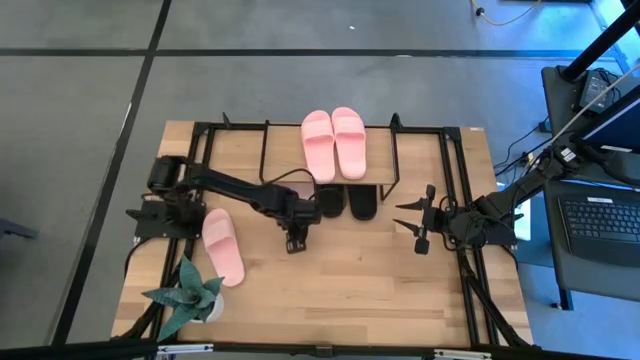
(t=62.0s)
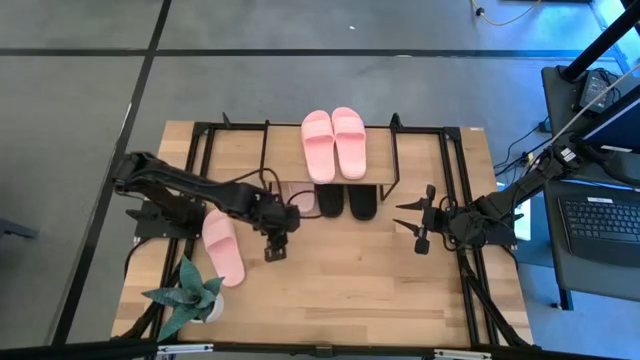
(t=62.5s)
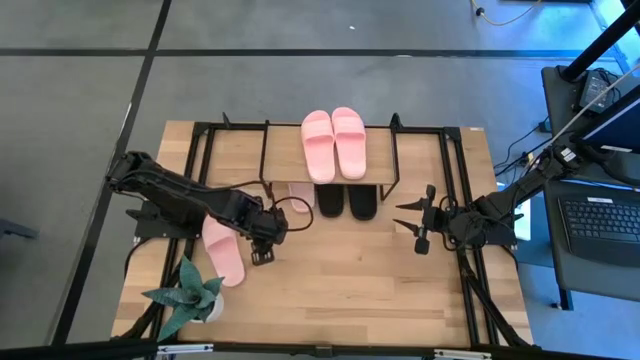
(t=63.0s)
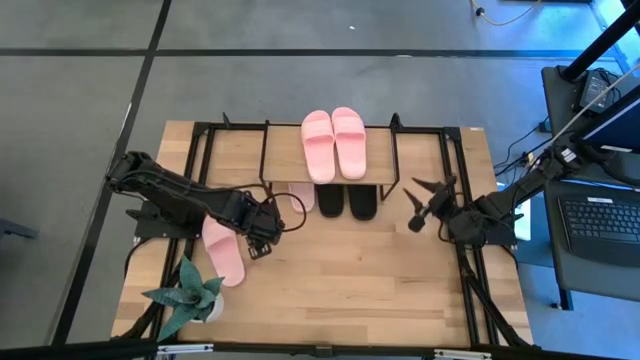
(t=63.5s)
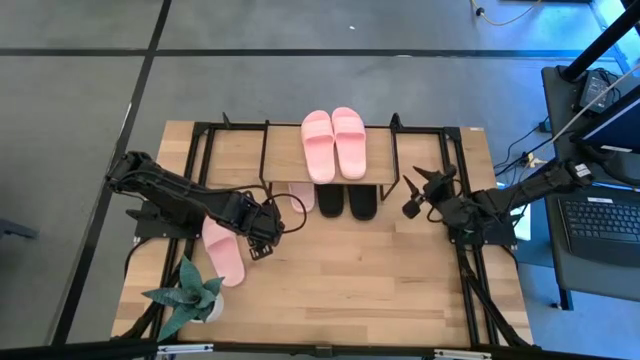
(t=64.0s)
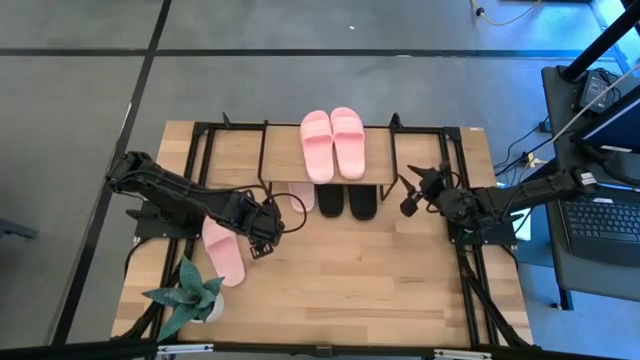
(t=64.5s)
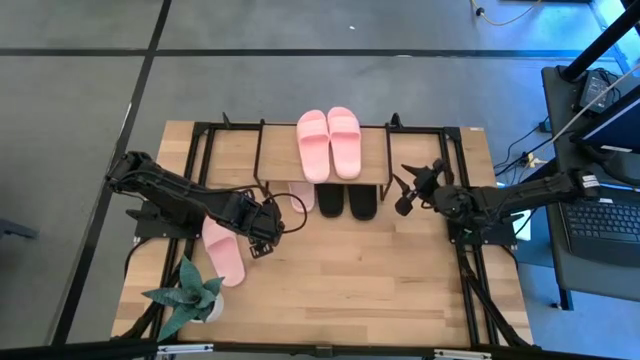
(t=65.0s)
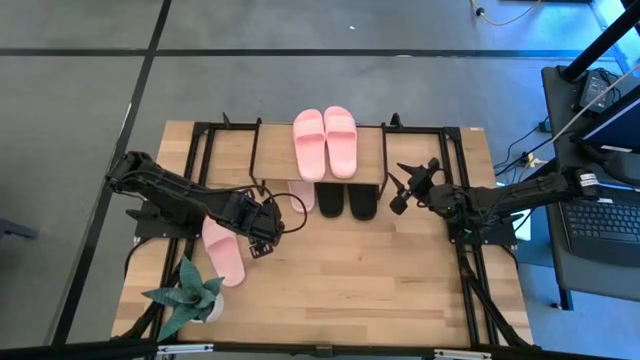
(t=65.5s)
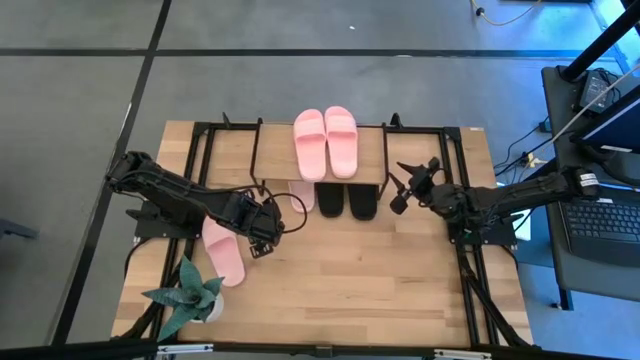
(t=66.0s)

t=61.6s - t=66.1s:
Task: Pick and place slides into the shelf
Adjust the shelf on the table

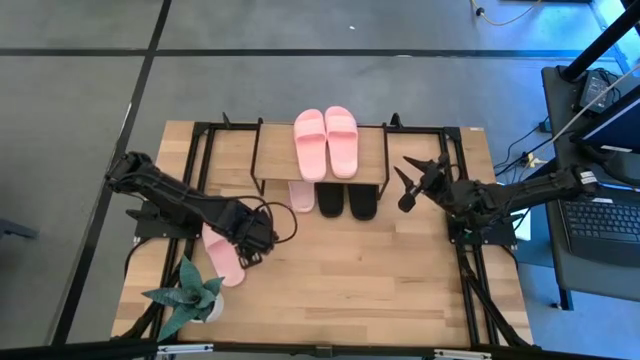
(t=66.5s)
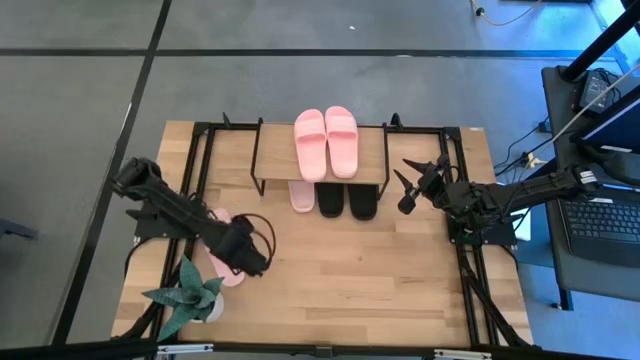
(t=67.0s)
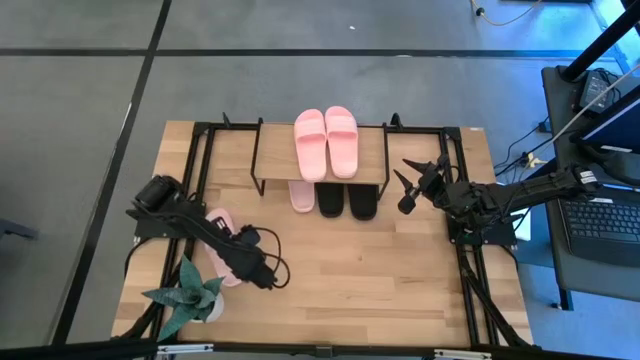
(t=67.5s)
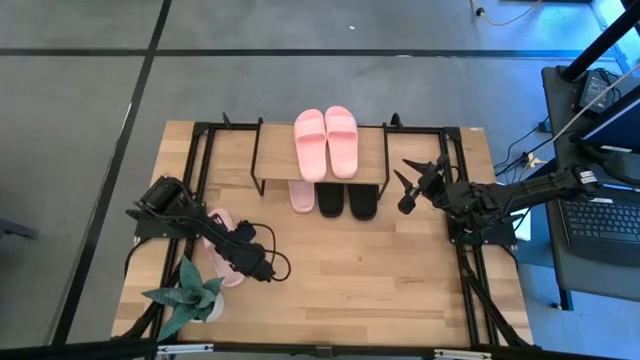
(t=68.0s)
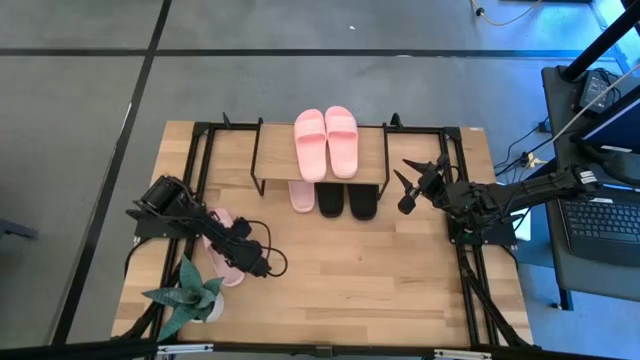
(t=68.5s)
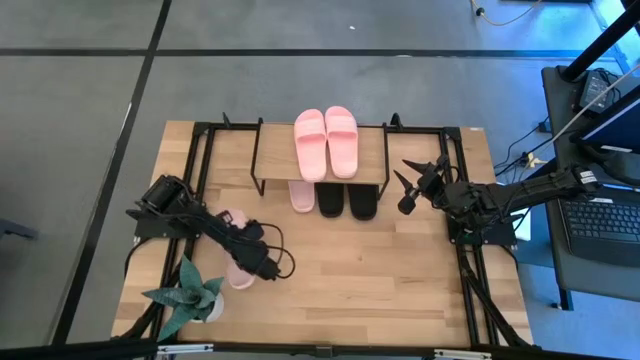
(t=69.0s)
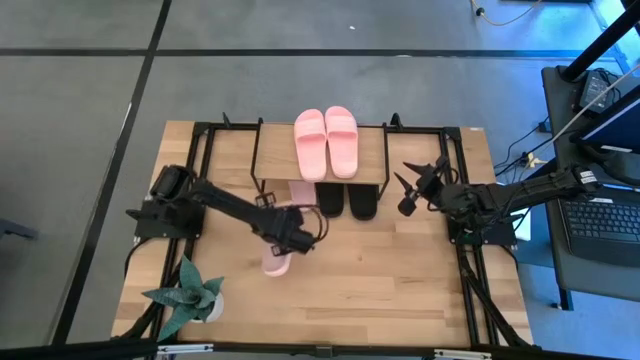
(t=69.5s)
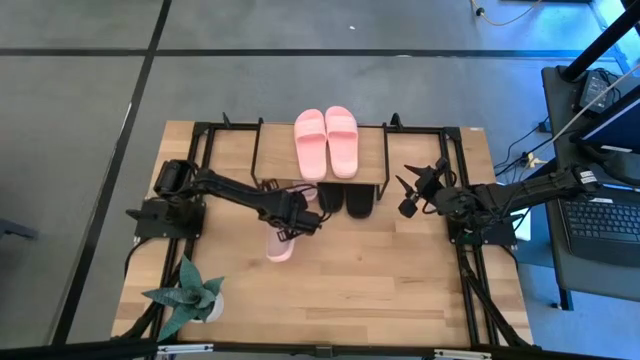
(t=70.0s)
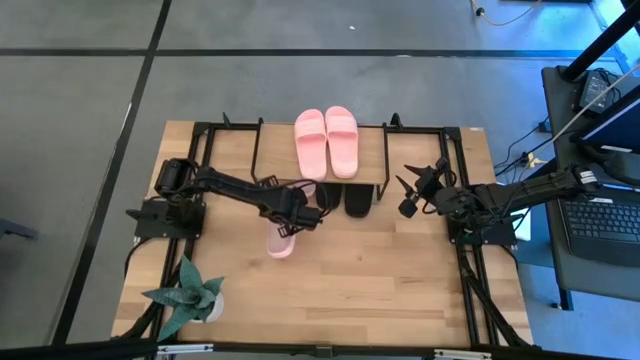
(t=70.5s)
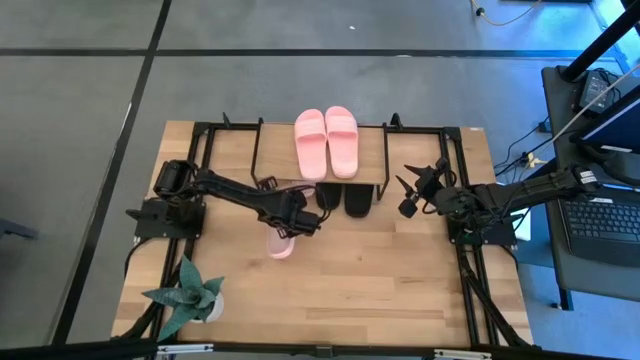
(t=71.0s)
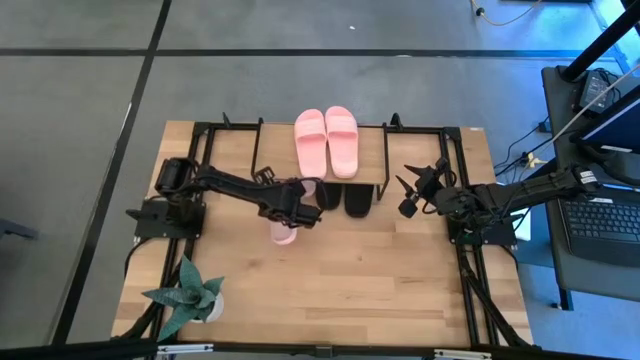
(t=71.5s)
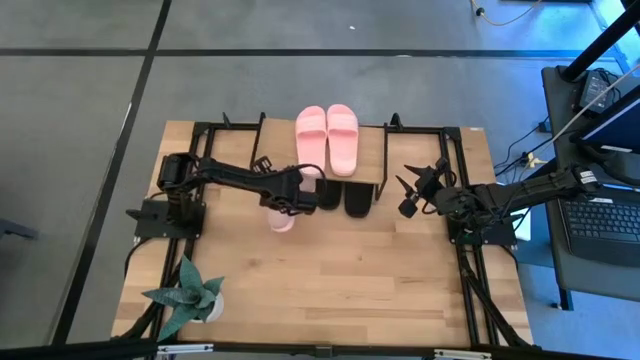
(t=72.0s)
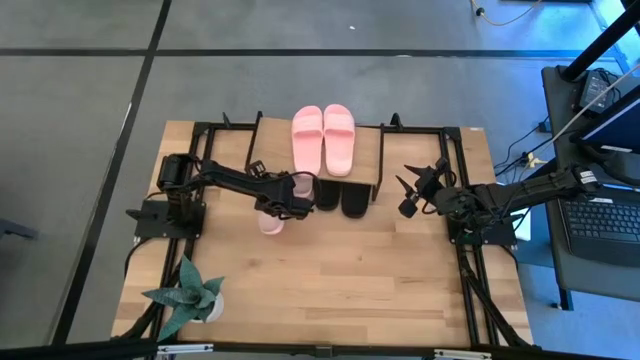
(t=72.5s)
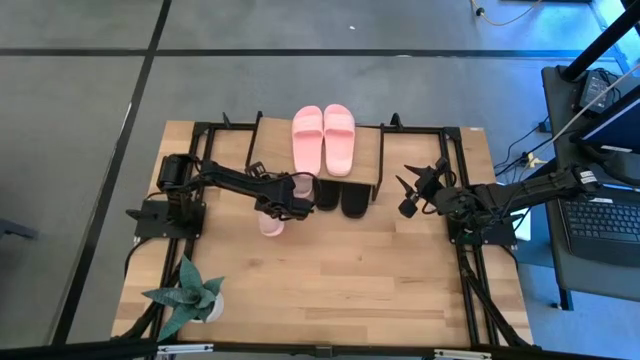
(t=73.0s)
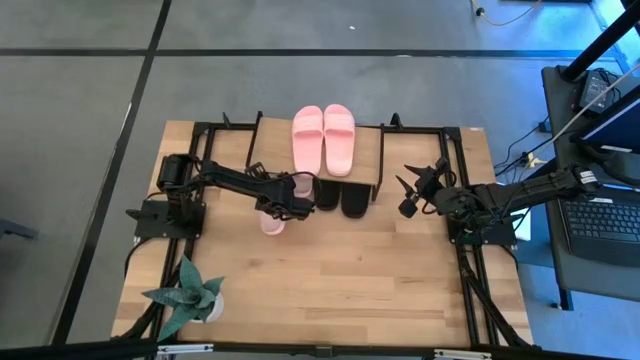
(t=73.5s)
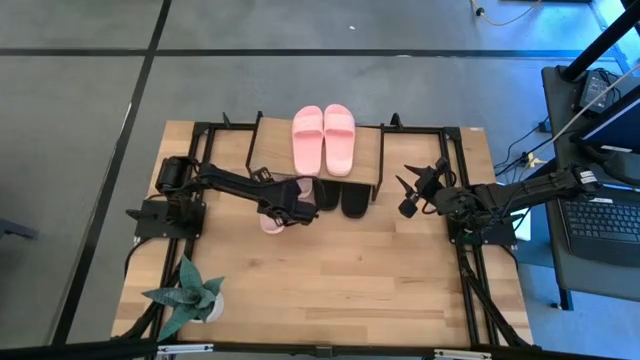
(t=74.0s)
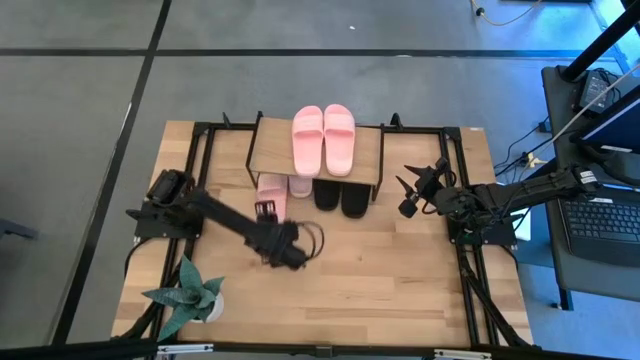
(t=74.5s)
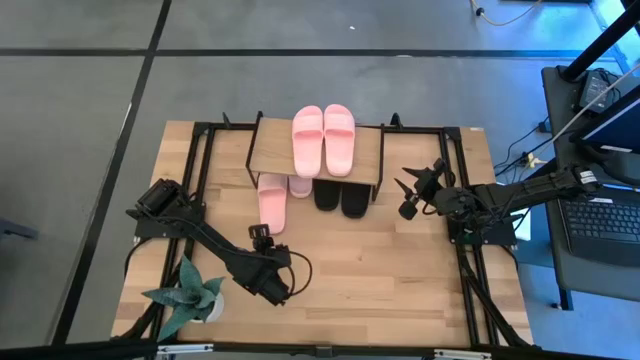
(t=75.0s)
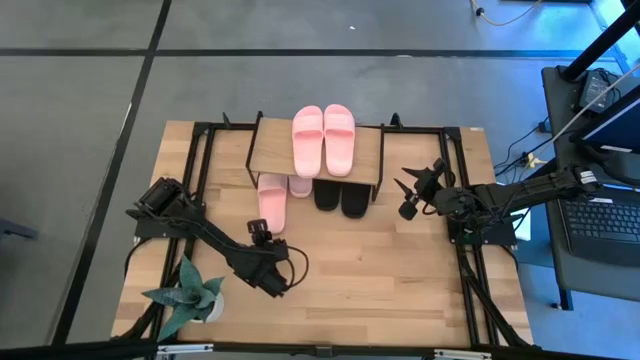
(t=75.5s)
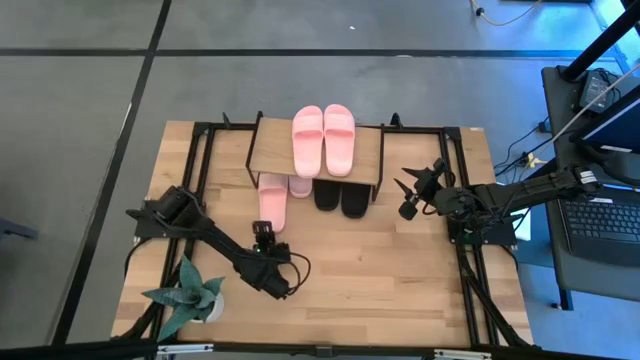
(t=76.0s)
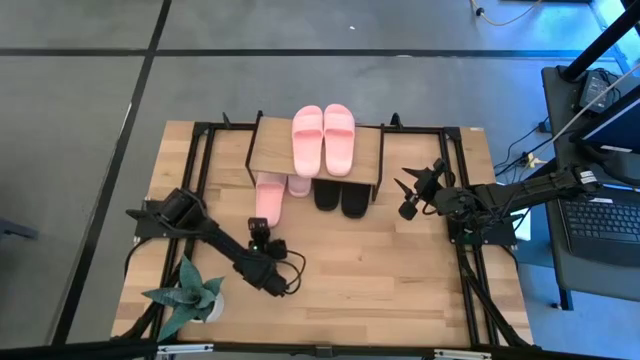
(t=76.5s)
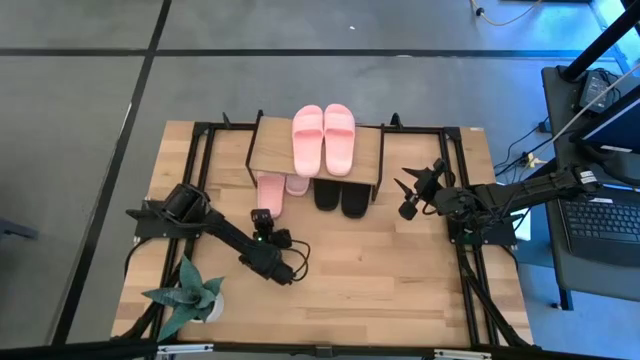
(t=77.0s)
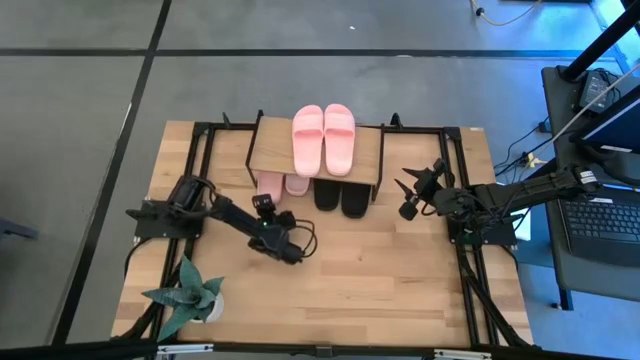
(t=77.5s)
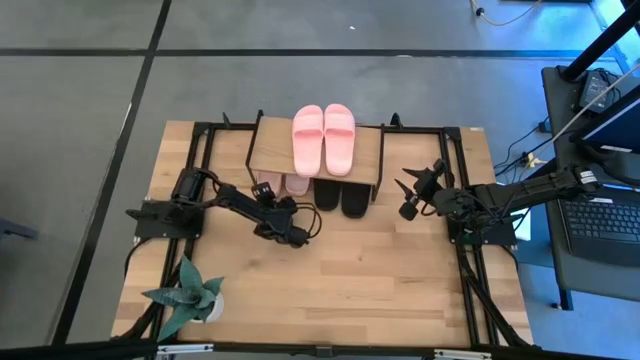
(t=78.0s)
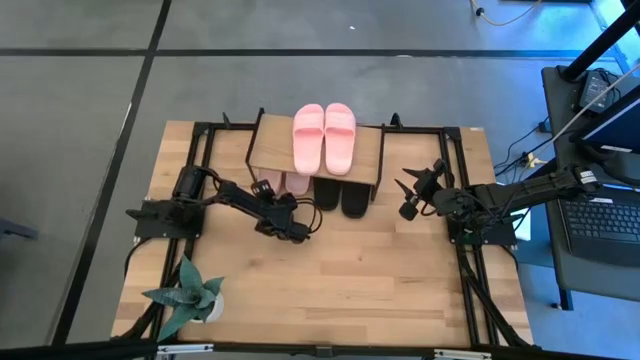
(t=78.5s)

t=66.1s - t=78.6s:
Put the pink slide under the shelf

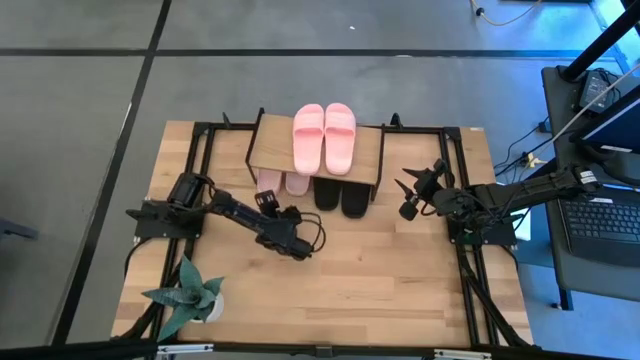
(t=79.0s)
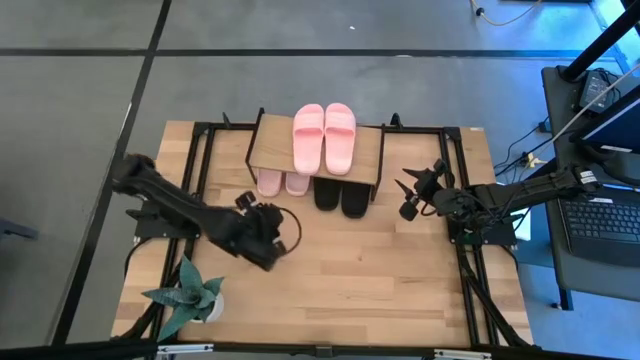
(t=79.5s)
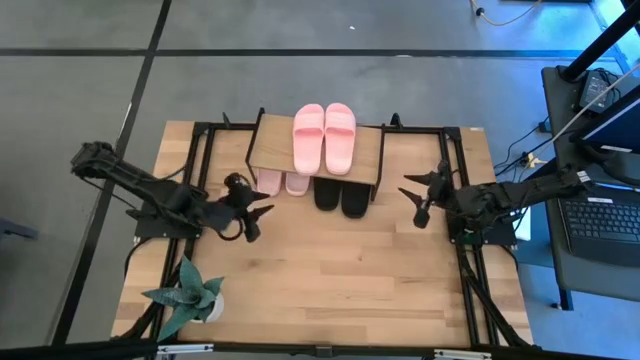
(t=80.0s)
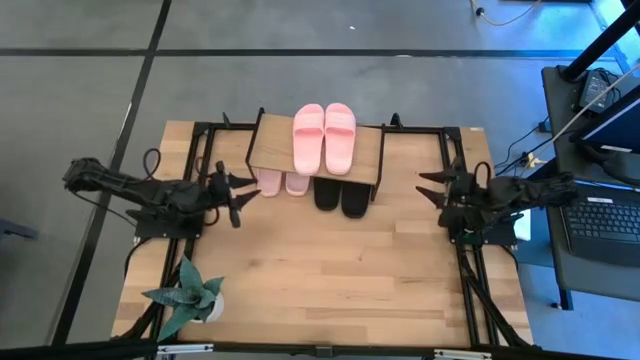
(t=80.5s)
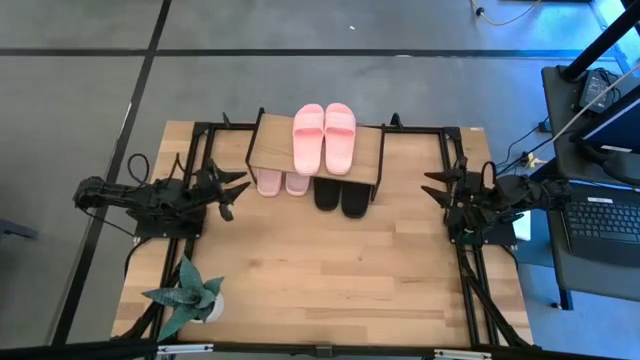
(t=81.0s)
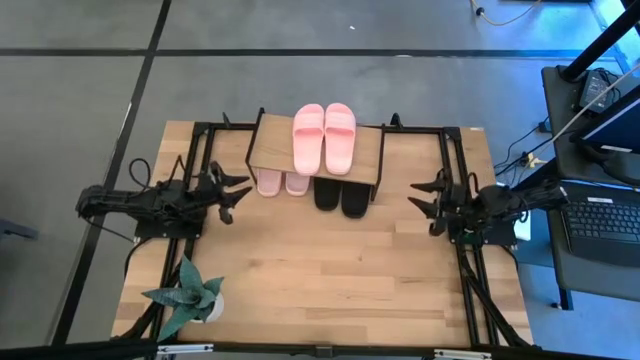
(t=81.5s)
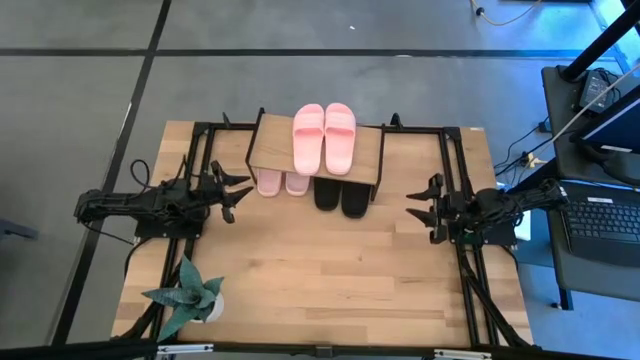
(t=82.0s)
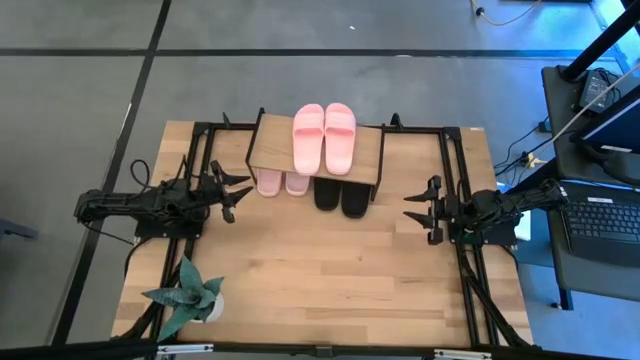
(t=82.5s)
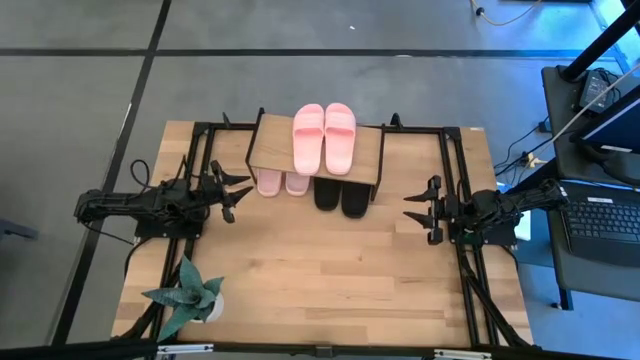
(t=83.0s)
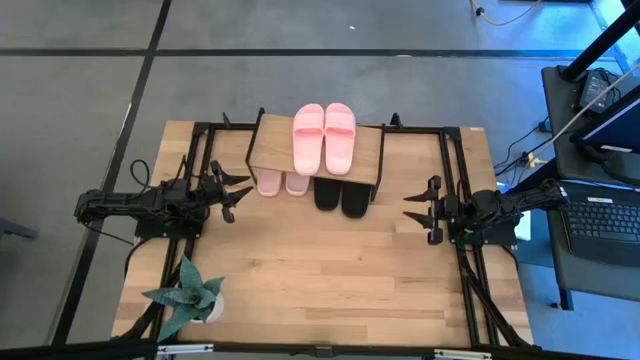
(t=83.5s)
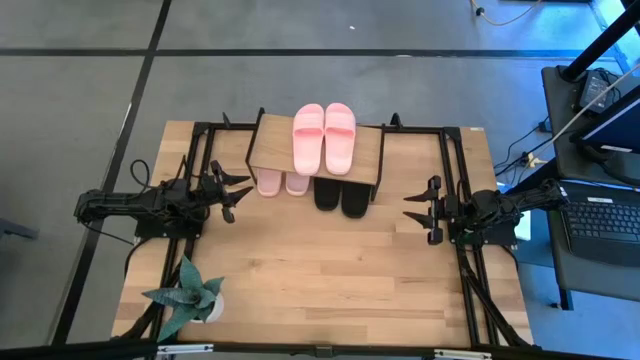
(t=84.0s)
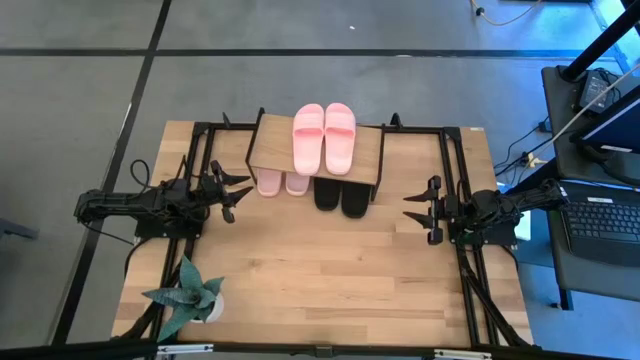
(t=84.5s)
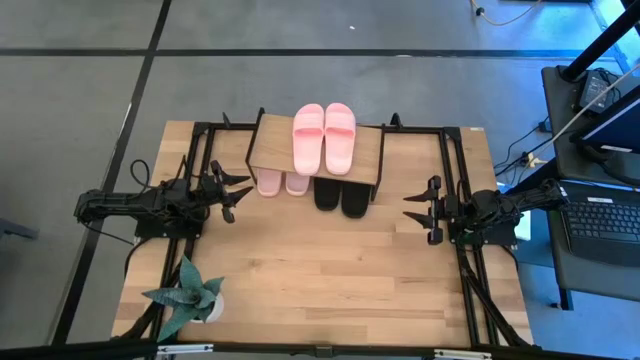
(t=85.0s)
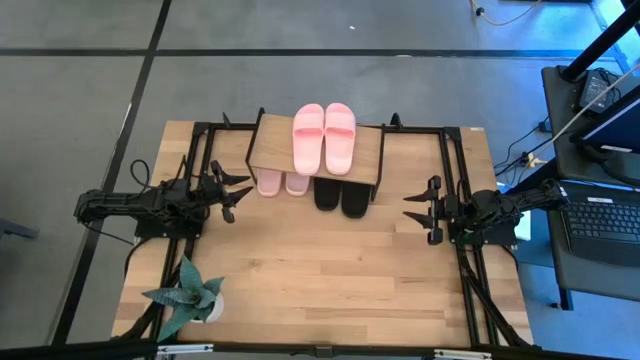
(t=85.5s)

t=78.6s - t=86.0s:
Return to Home Position
